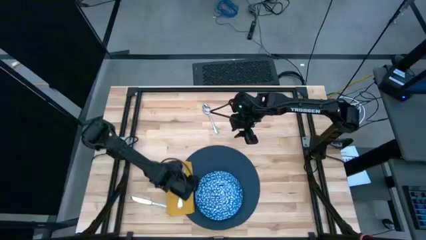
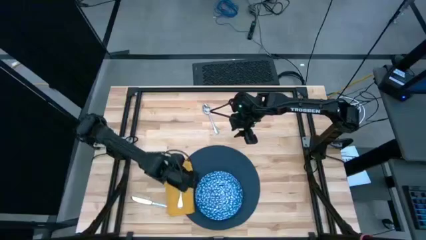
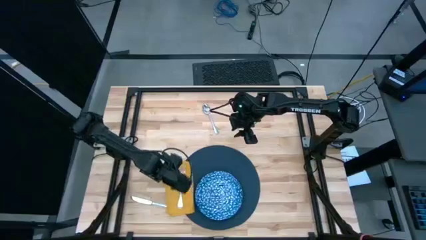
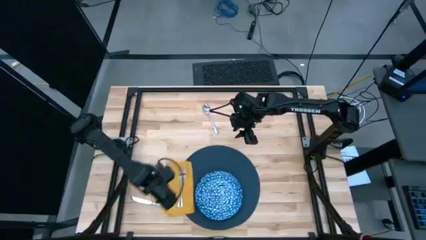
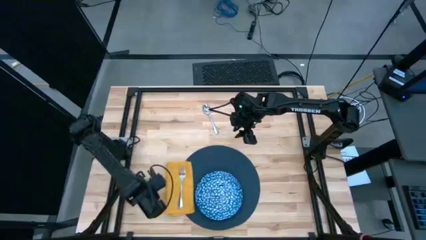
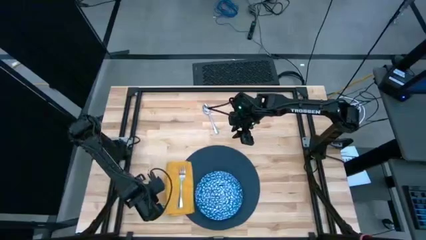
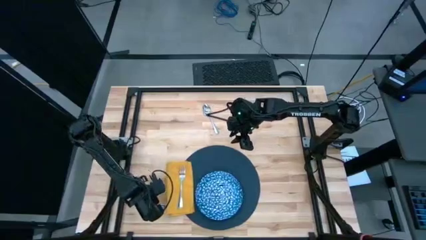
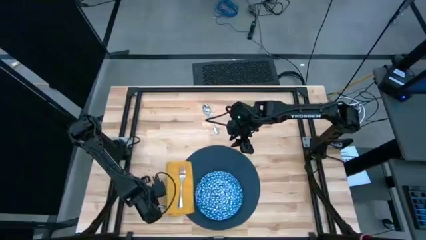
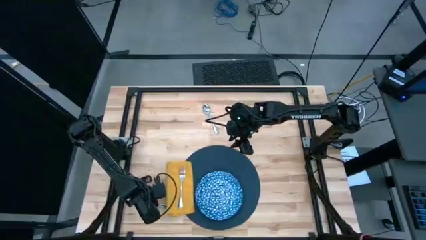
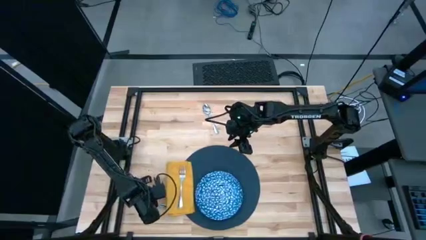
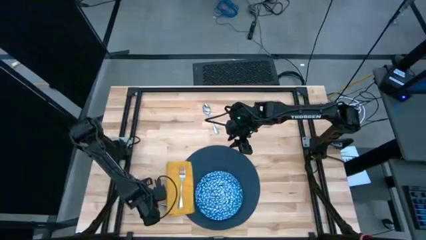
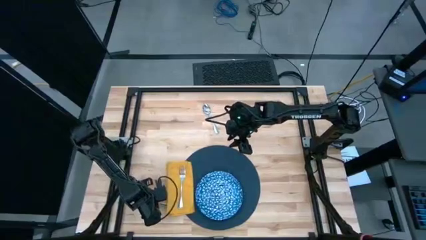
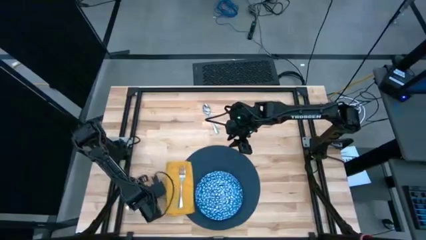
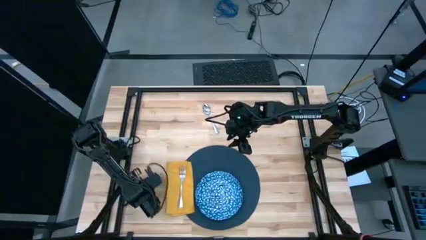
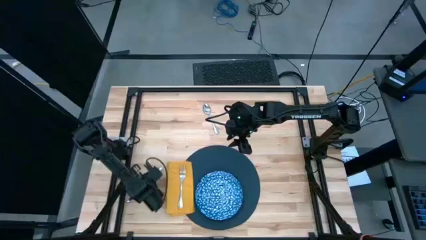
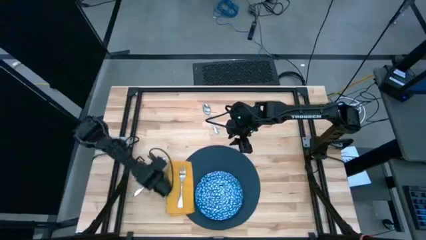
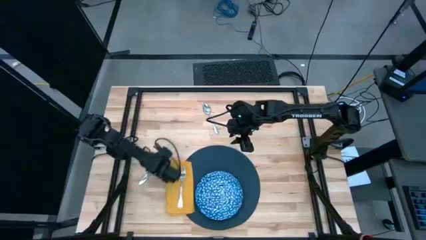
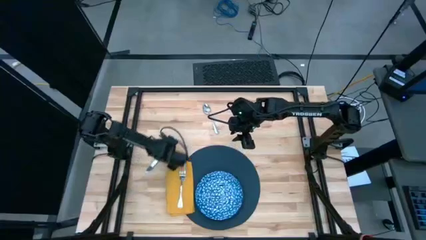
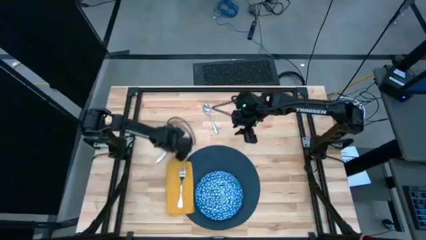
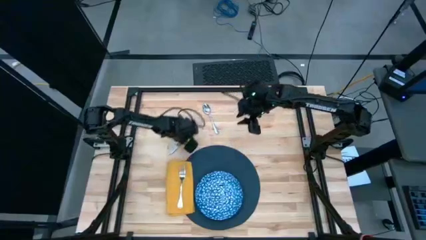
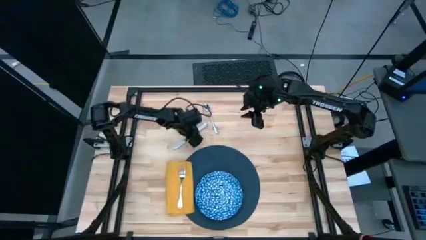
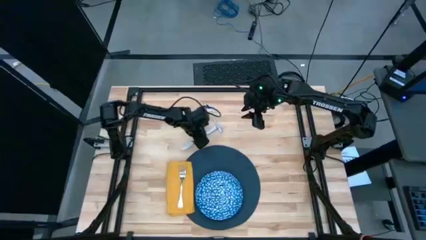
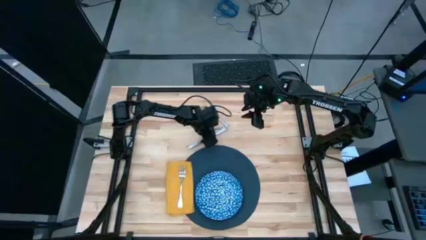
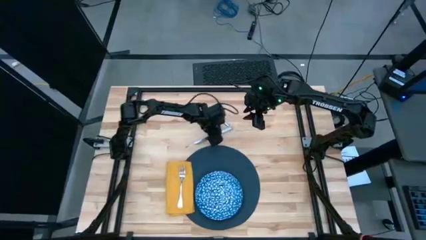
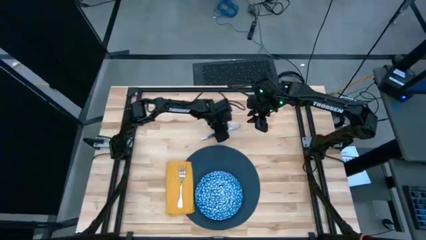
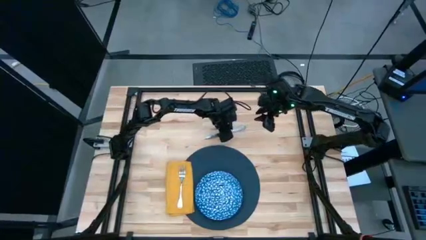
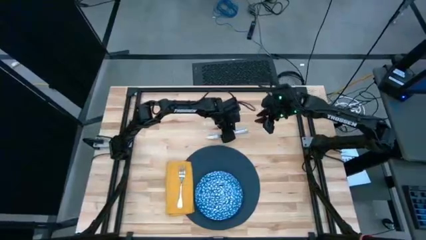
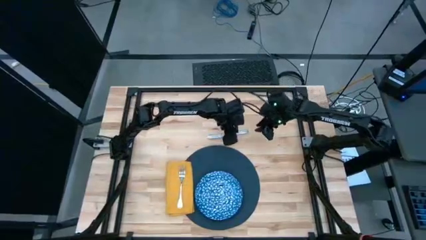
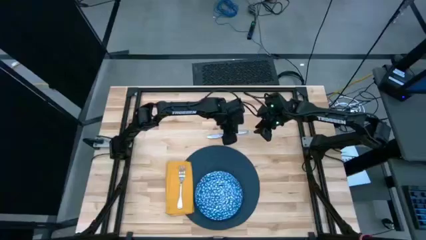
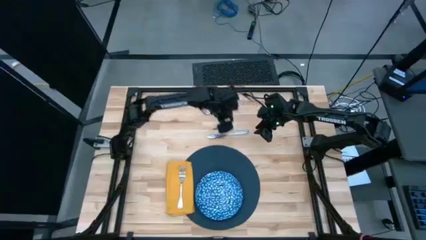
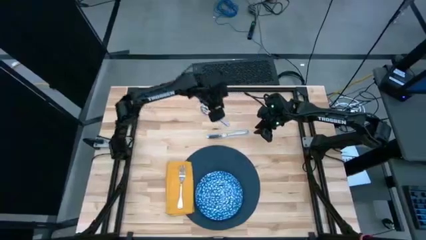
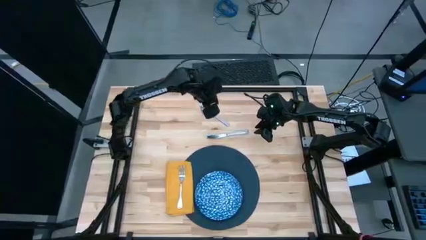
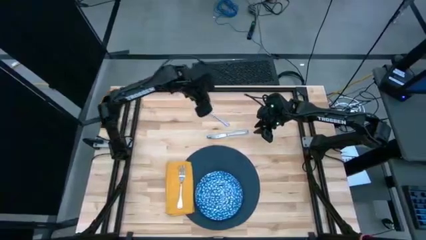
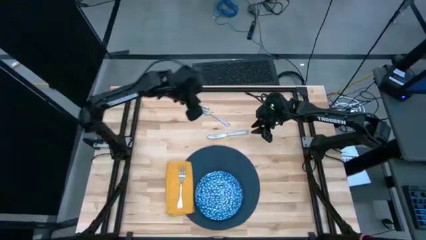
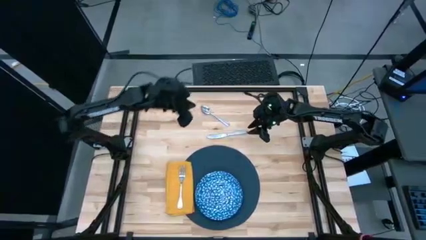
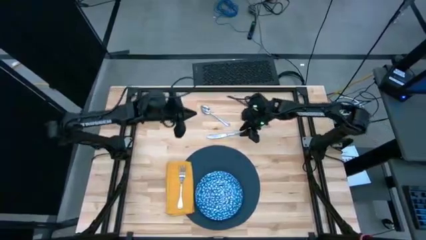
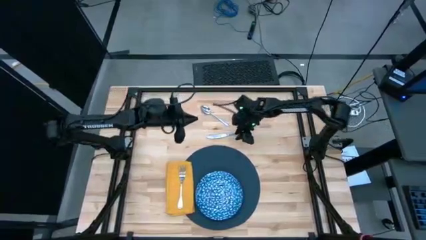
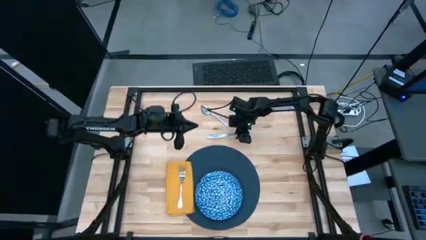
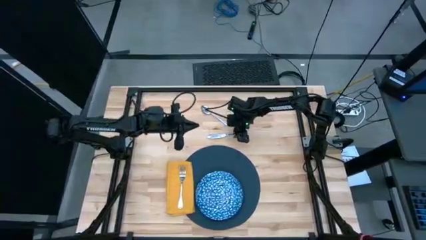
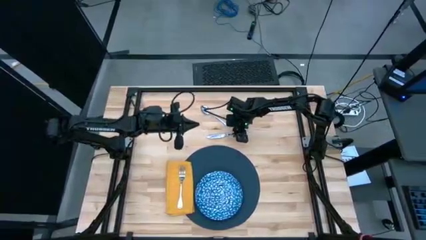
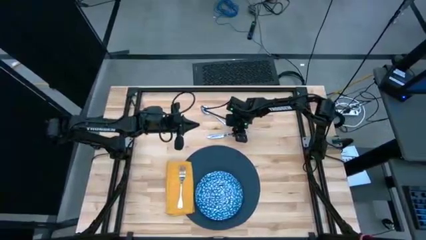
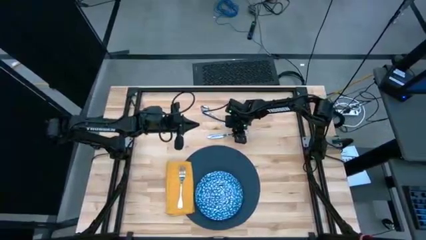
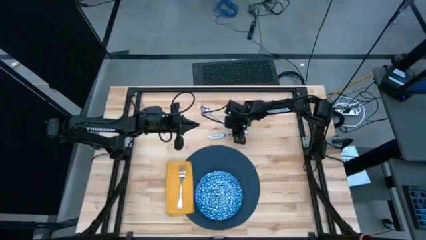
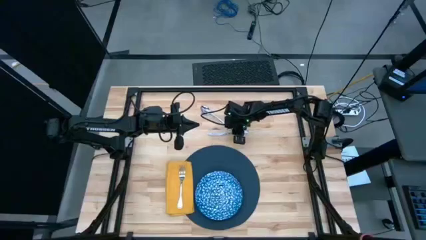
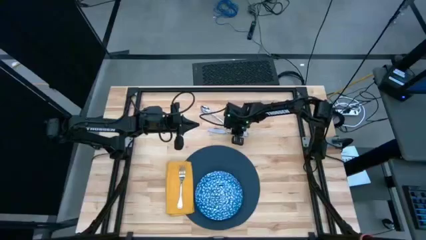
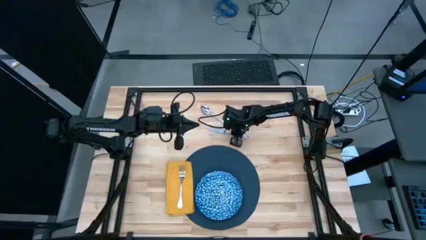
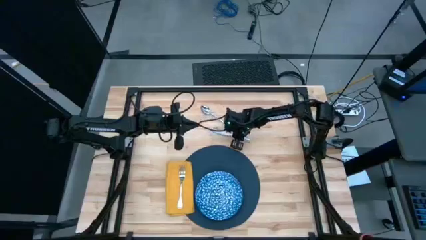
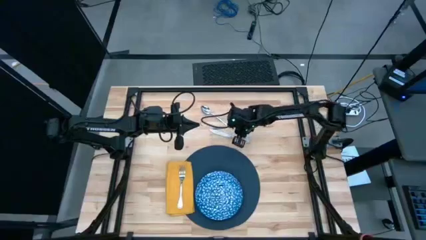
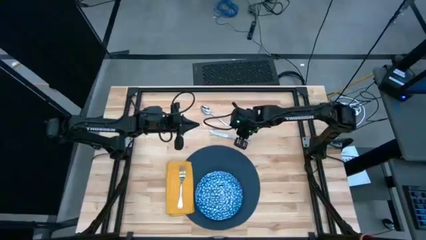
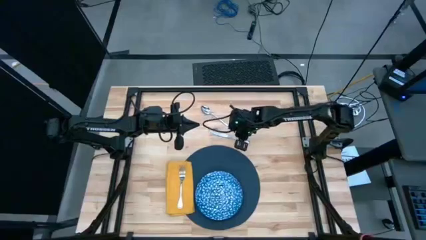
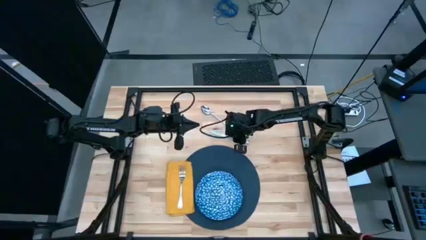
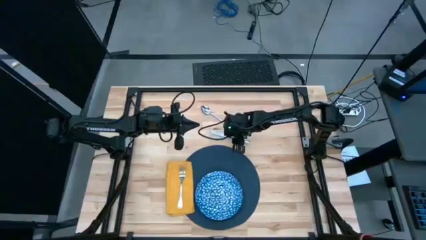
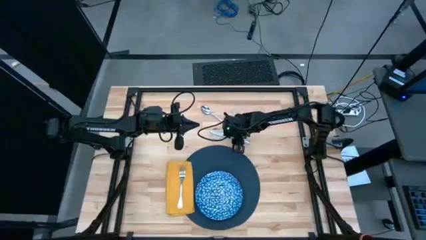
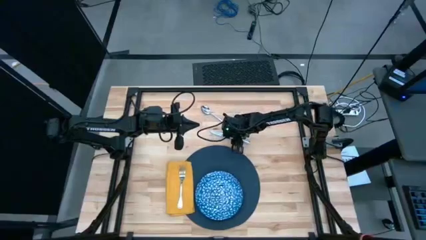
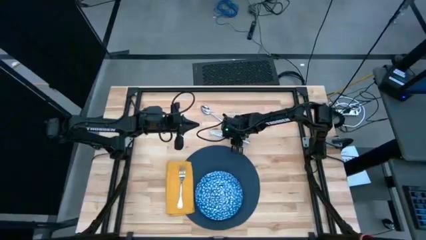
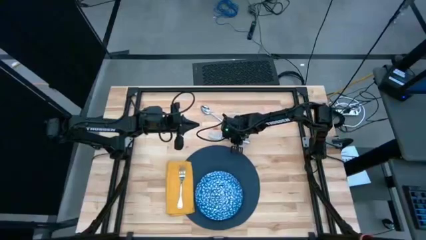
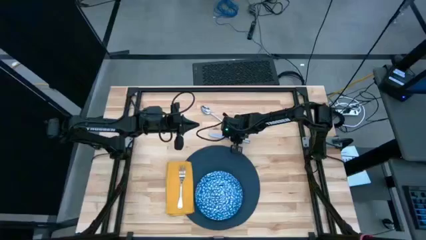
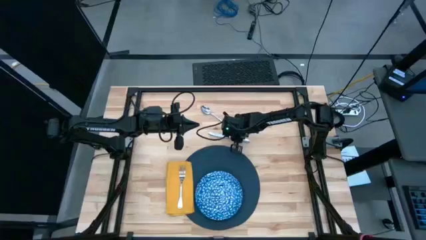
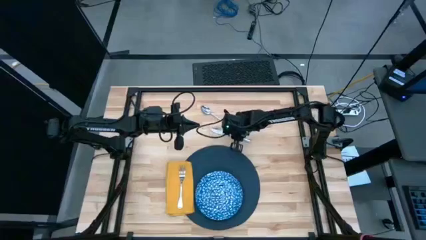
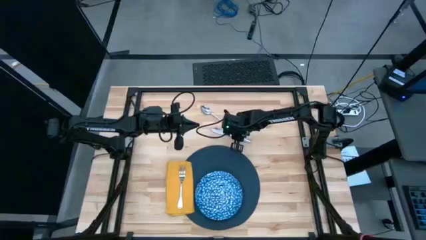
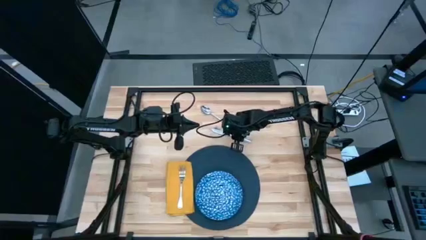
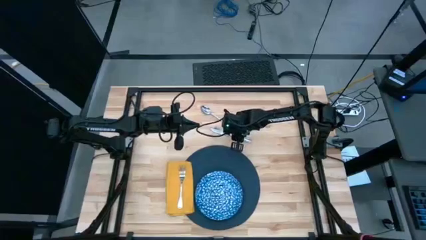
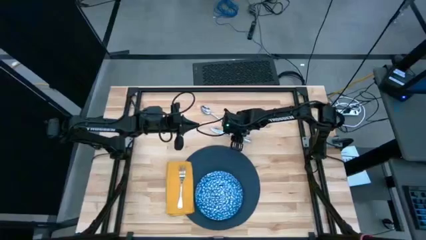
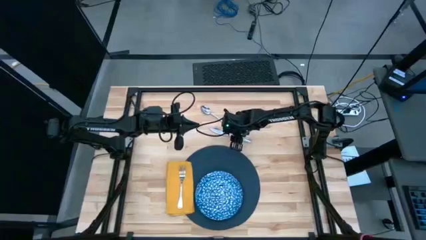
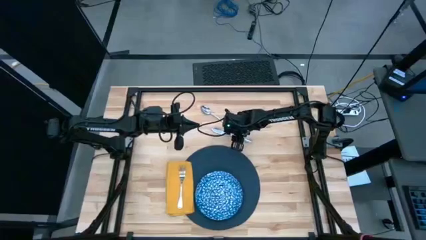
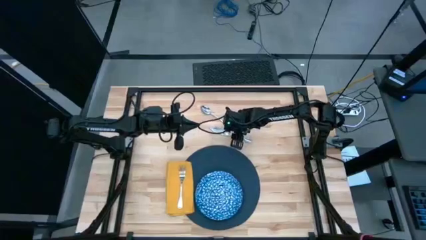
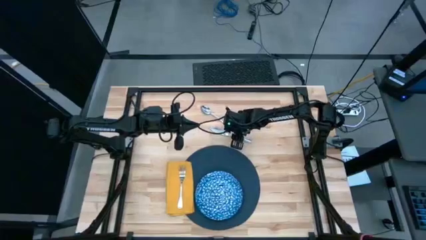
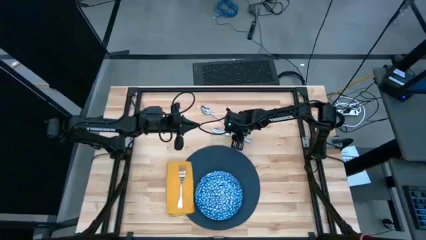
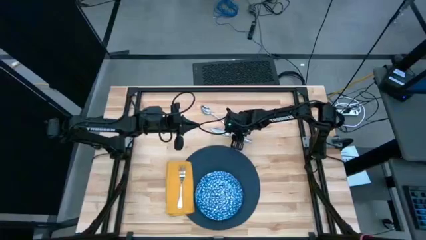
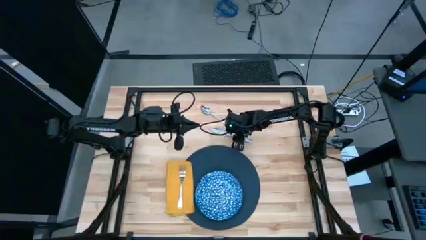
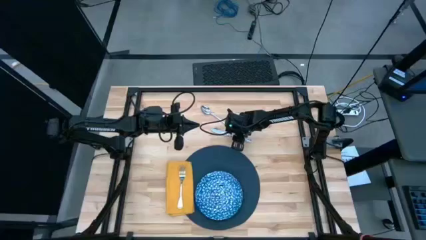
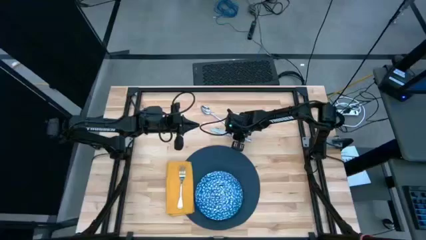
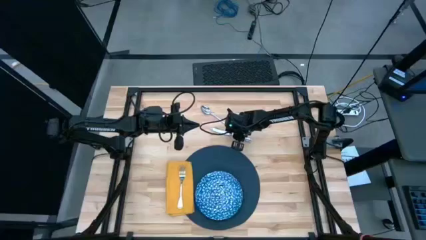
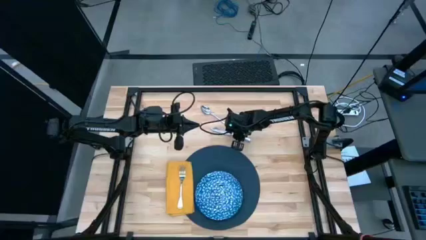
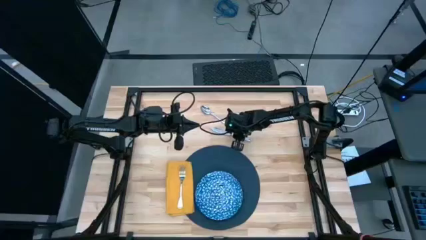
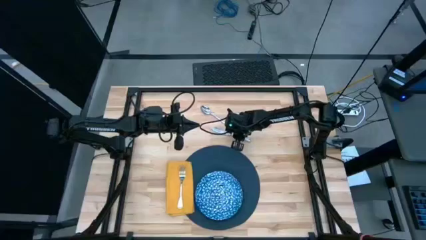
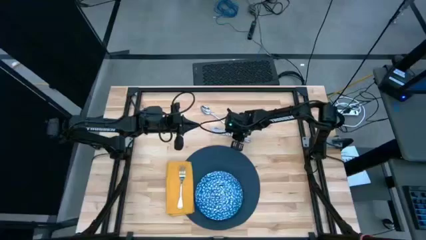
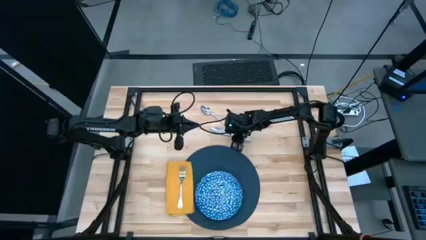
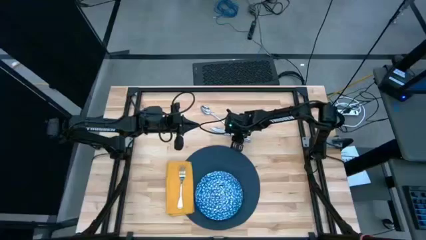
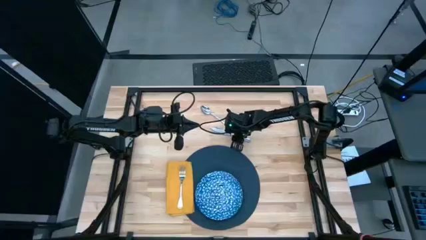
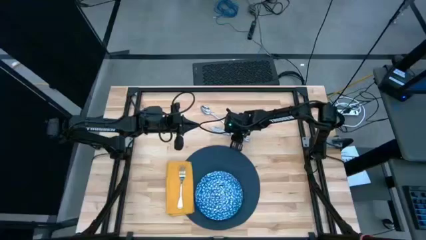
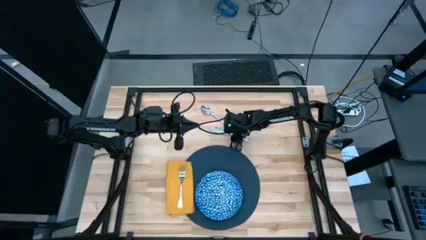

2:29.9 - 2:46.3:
Task: Set table place
Put the silver table knife on the blue table mat to the right of the blue plate
